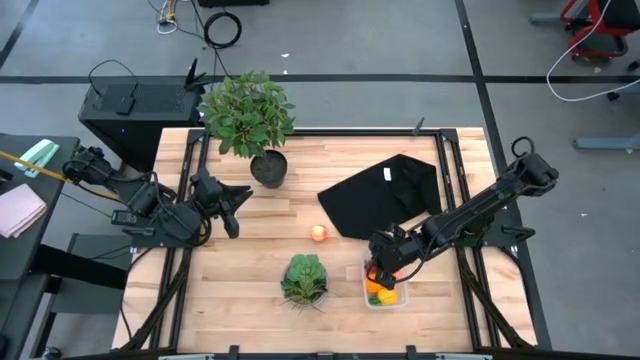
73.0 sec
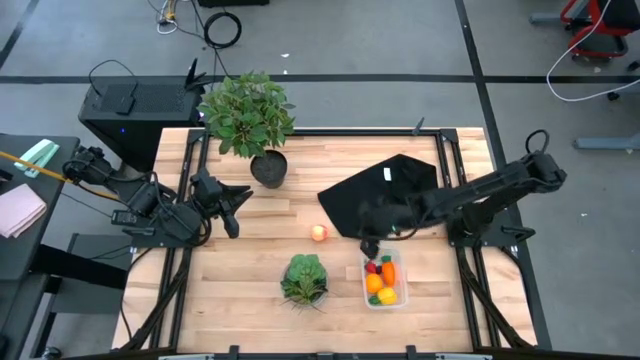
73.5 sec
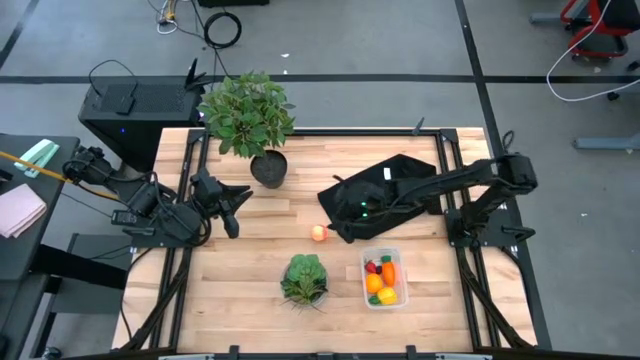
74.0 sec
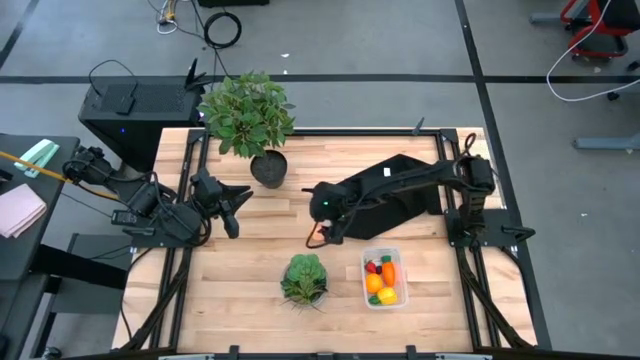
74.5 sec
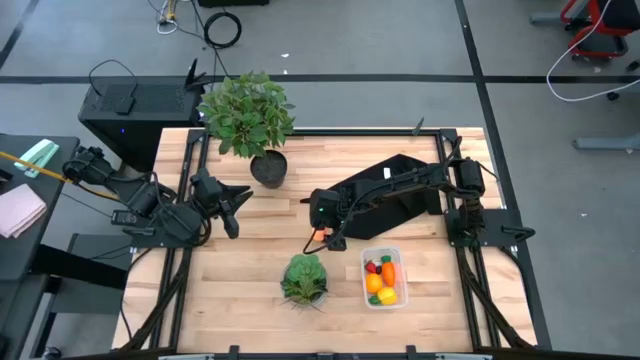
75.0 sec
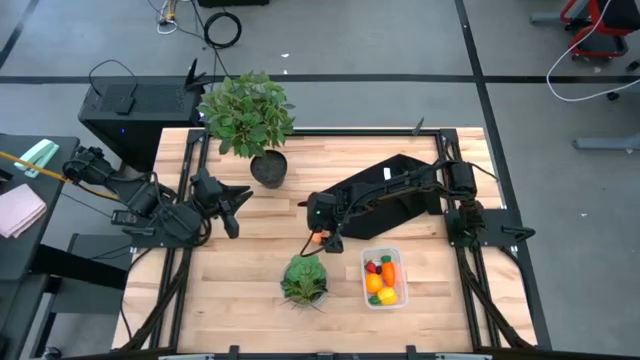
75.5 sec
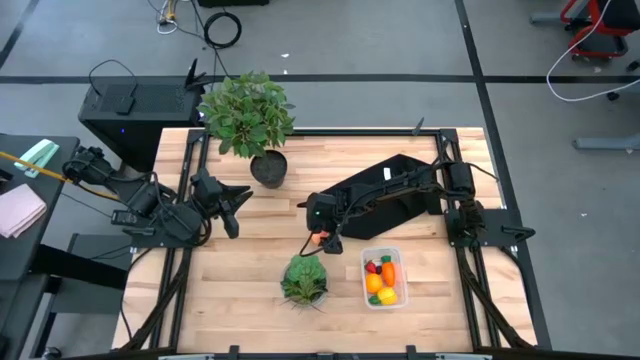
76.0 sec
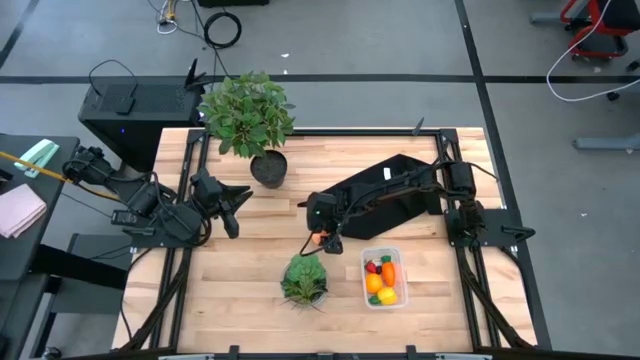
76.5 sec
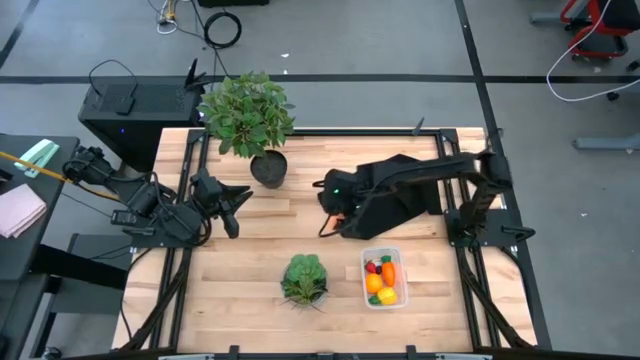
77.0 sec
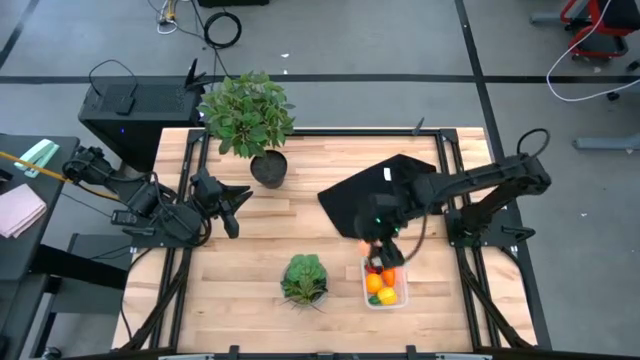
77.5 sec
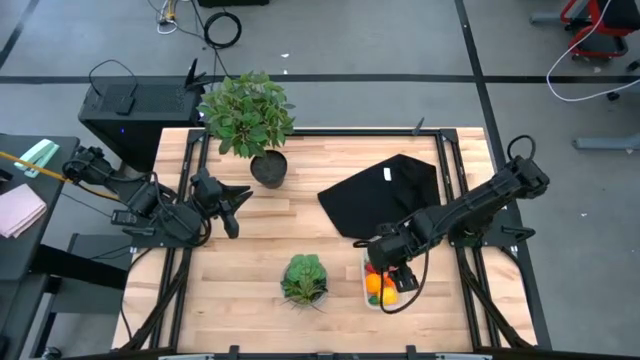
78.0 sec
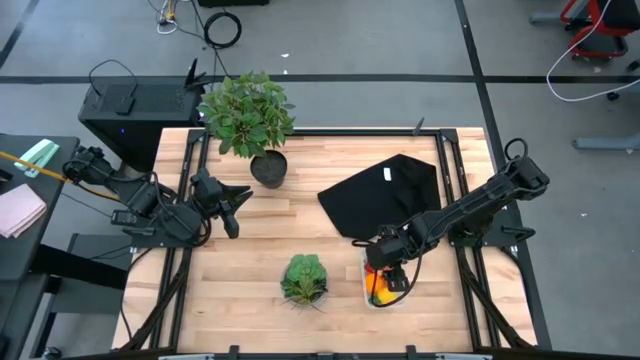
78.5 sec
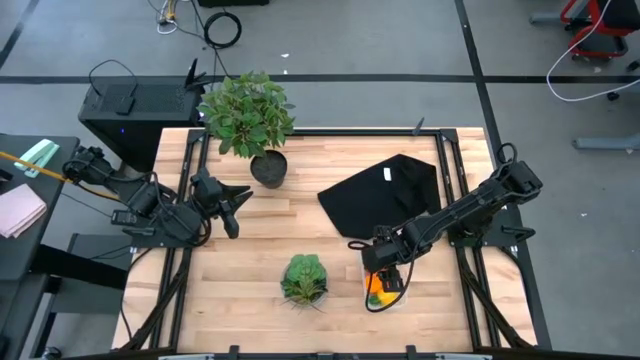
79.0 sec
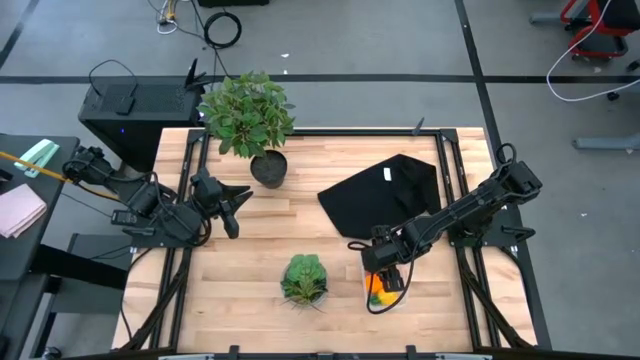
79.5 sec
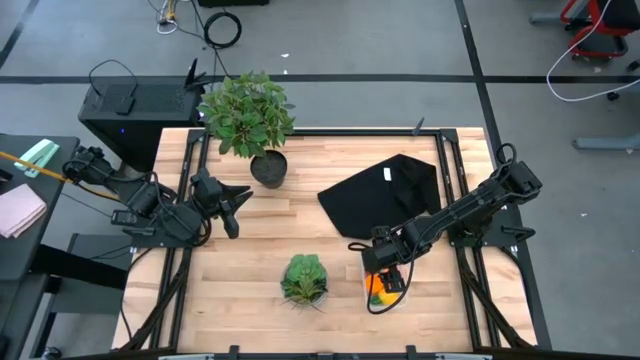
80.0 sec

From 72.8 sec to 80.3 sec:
Task: Pick and placing Produce into tupperware
Put the peach into the transparent bin

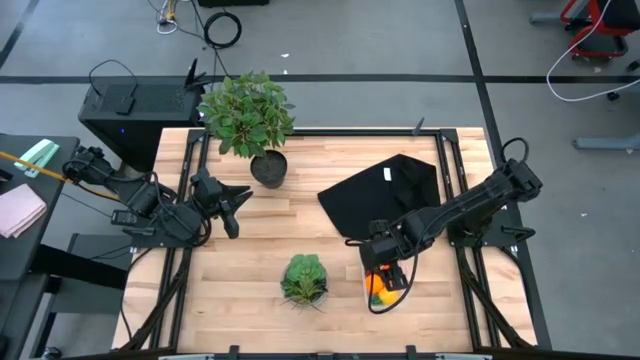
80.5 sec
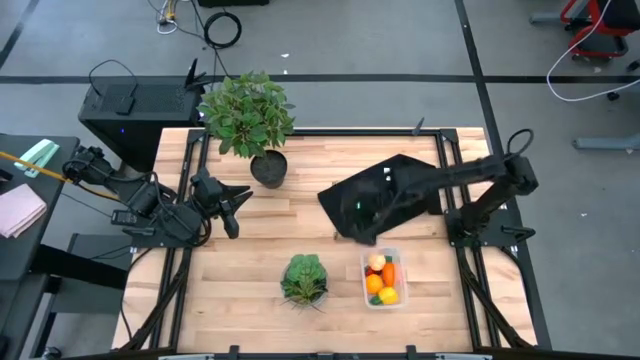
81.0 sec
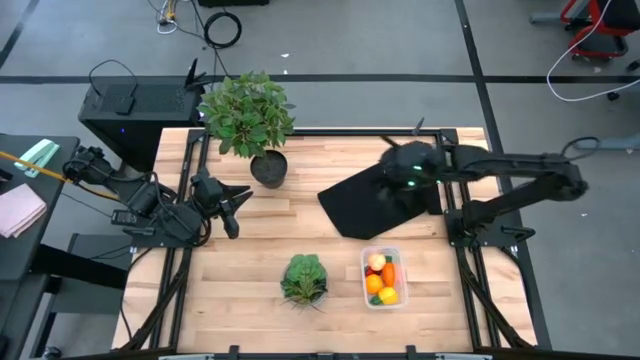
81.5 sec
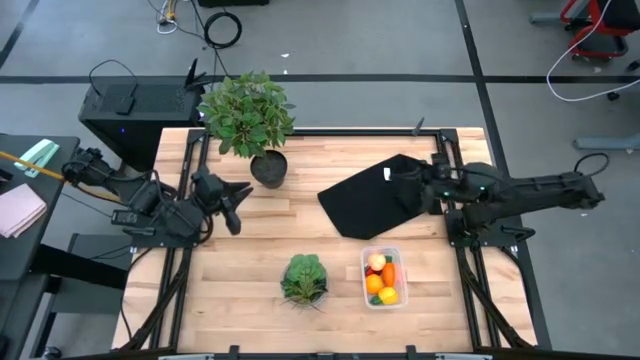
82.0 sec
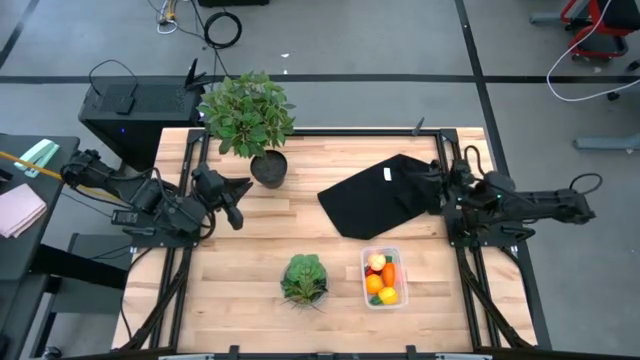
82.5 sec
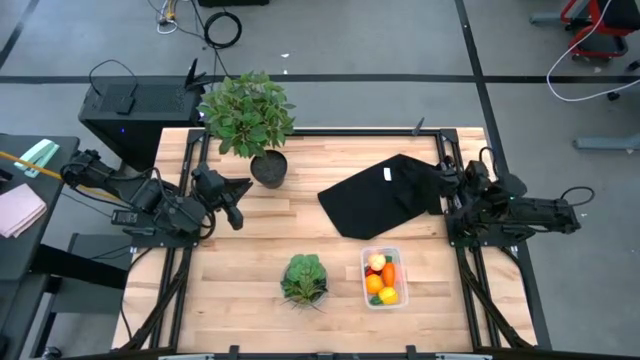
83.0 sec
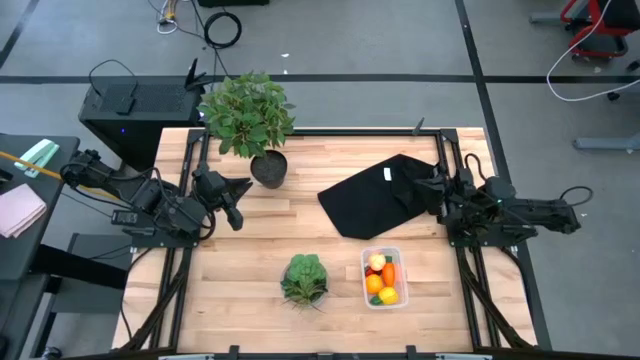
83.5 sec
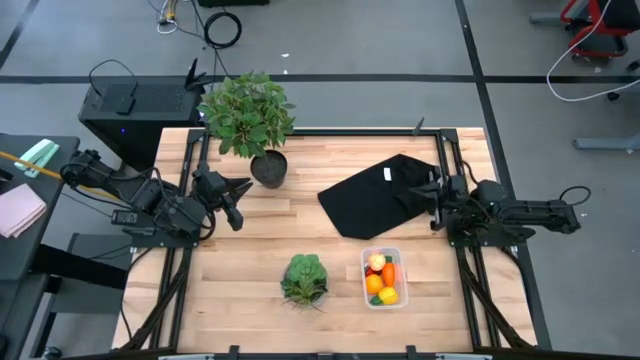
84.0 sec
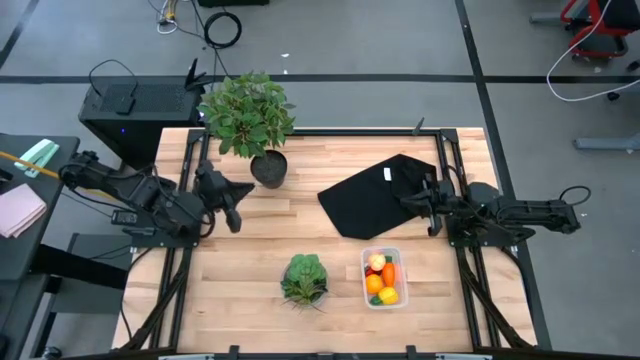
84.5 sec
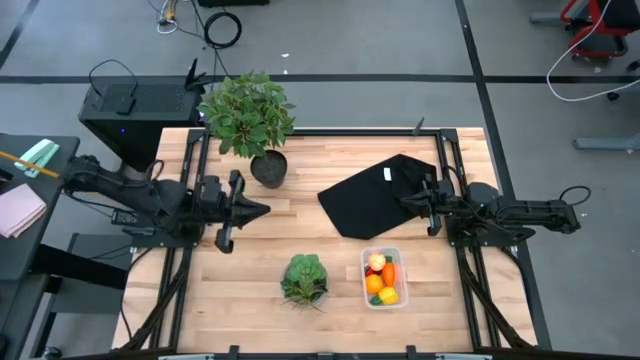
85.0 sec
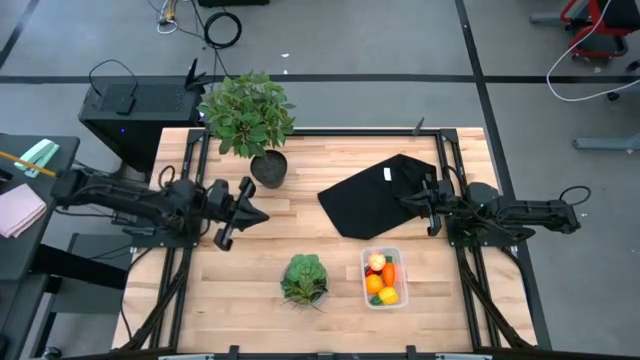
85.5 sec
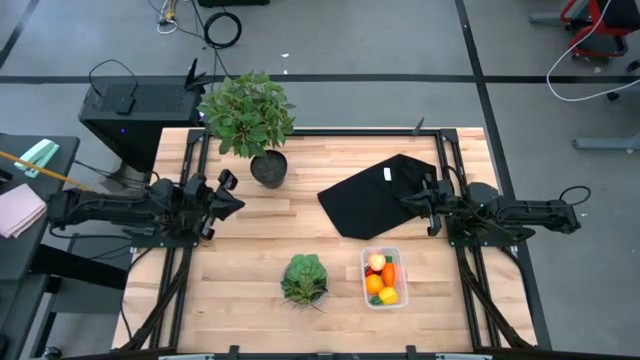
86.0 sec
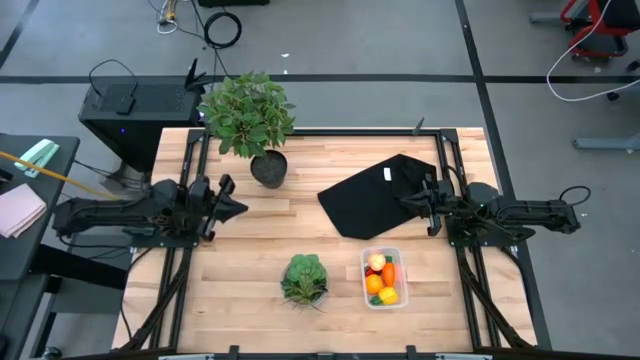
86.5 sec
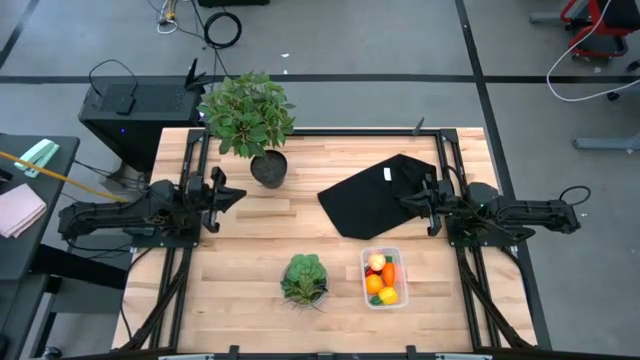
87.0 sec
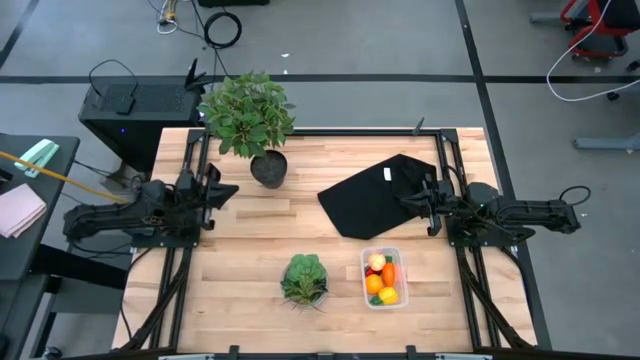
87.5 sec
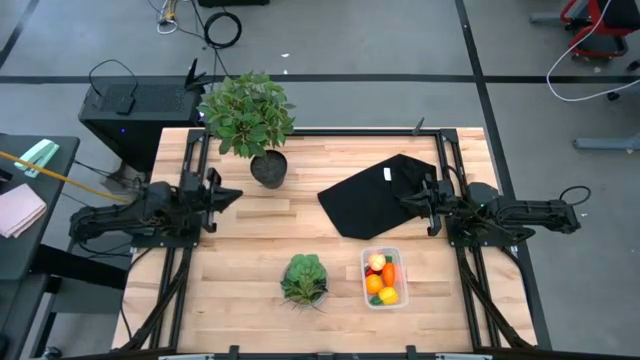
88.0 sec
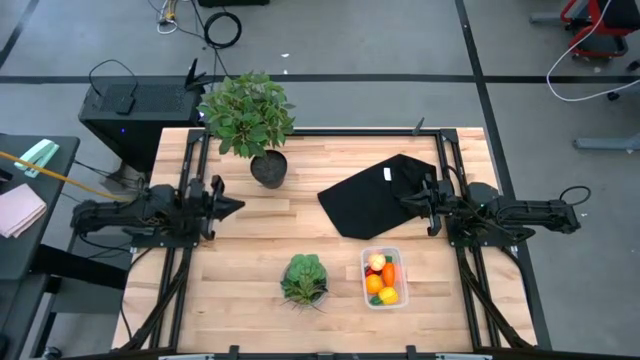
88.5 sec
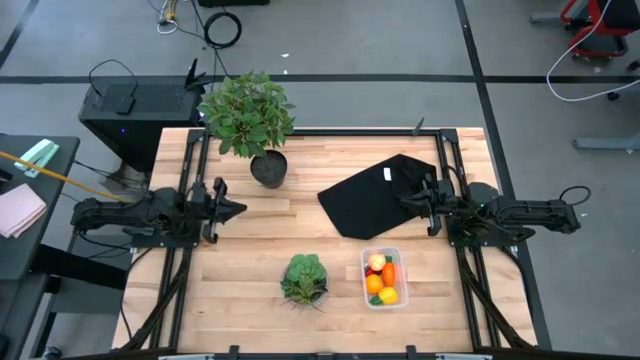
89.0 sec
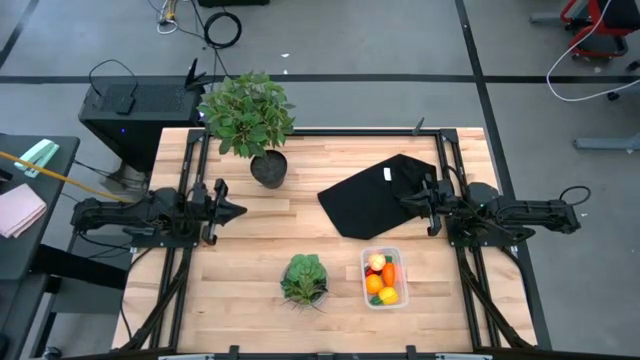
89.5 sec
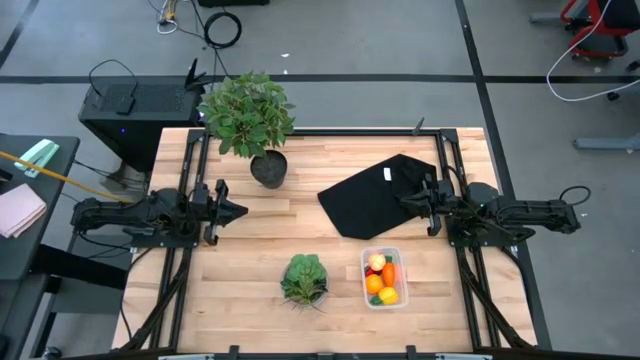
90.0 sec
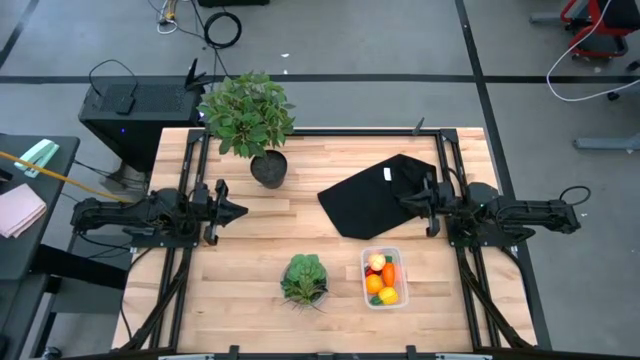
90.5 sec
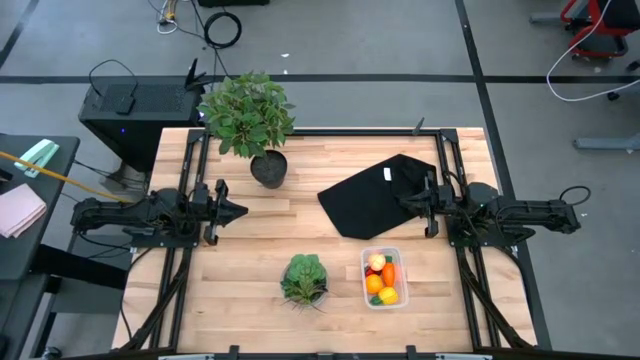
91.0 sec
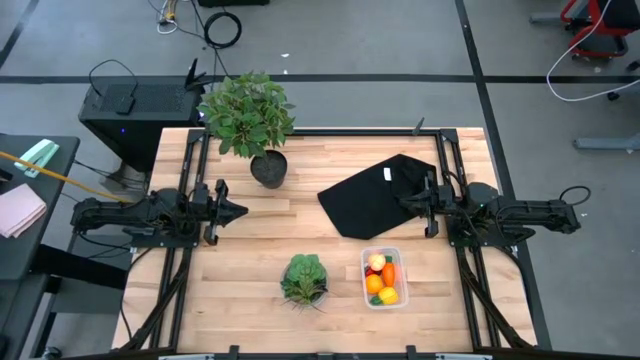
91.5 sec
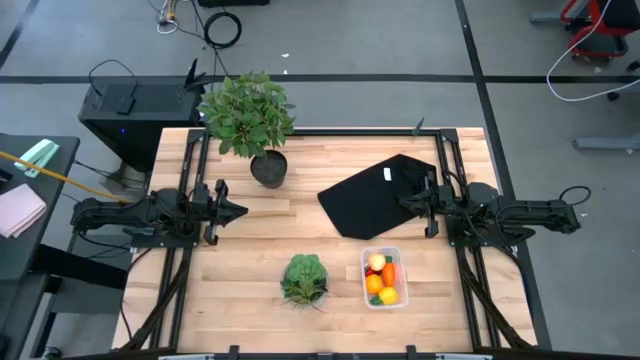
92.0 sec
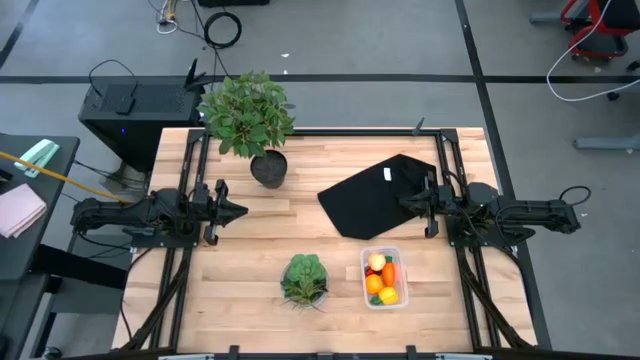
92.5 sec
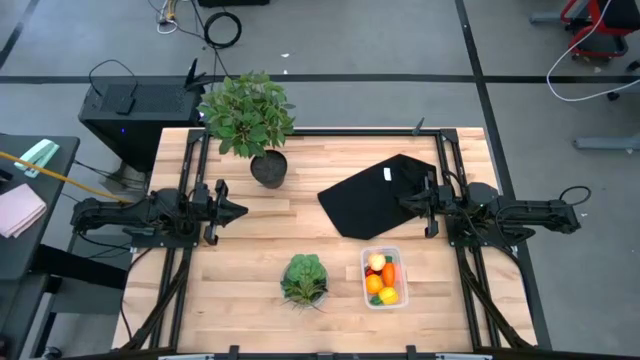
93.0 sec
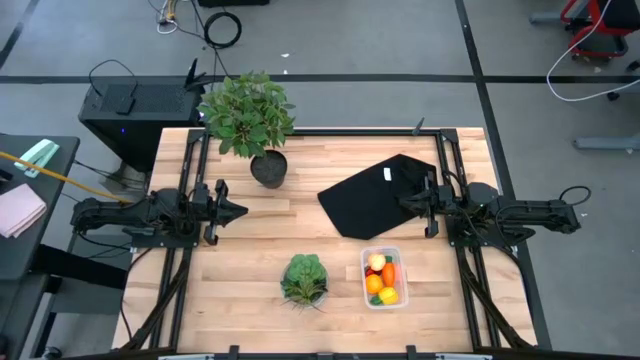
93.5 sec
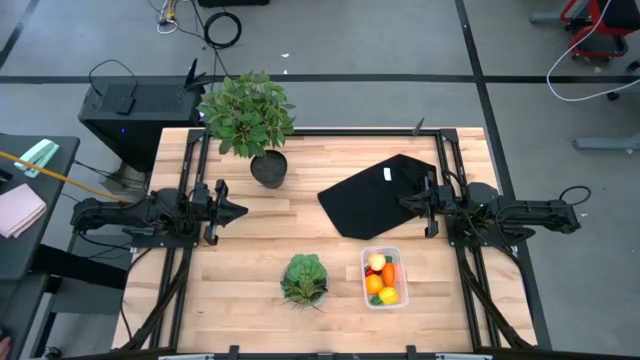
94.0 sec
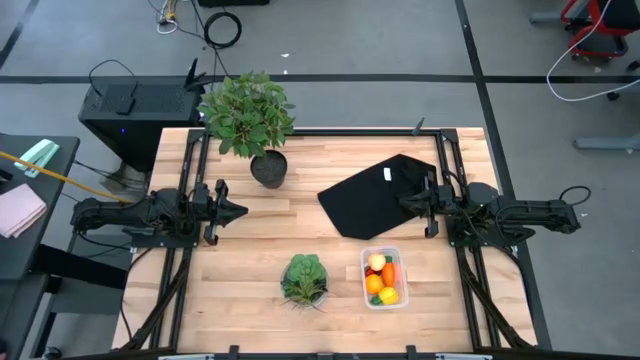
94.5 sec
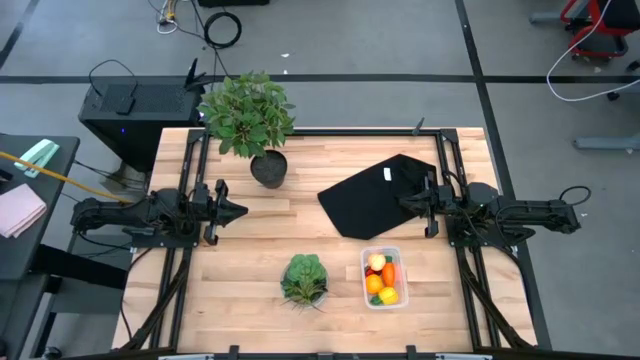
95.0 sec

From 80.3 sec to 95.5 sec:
Return to Home Position

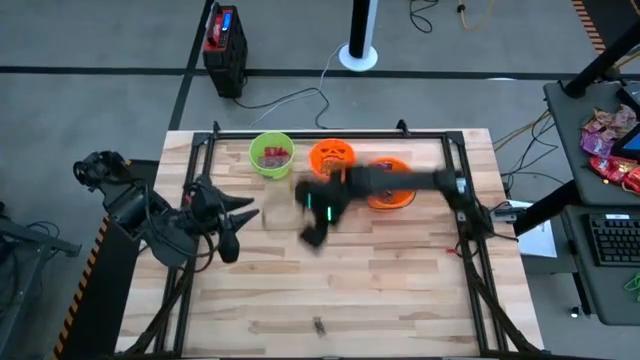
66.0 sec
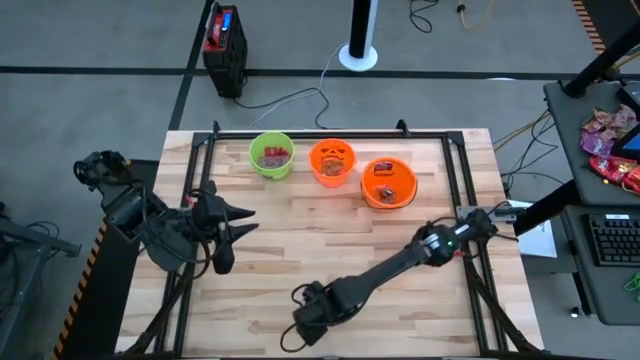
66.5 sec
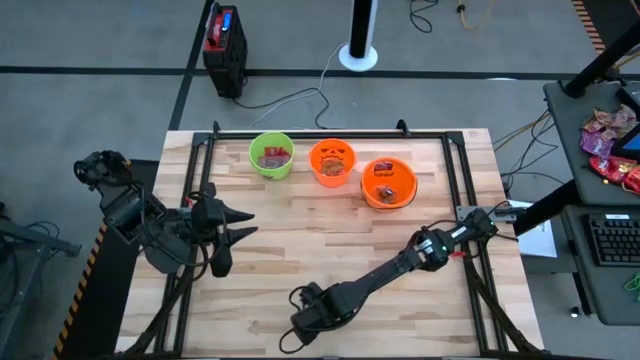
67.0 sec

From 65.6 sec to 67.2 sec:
Task: Sort candy by brand, put in halloween buckets
Put the black candy into the right orange bucket
